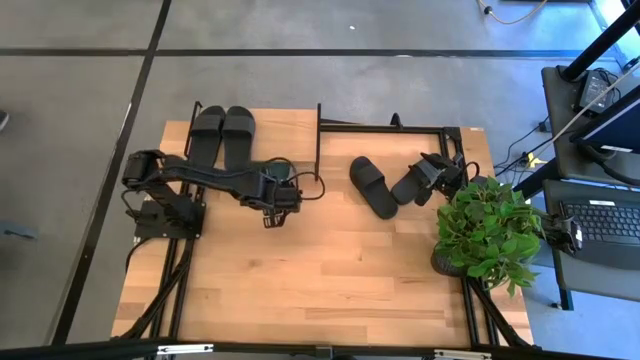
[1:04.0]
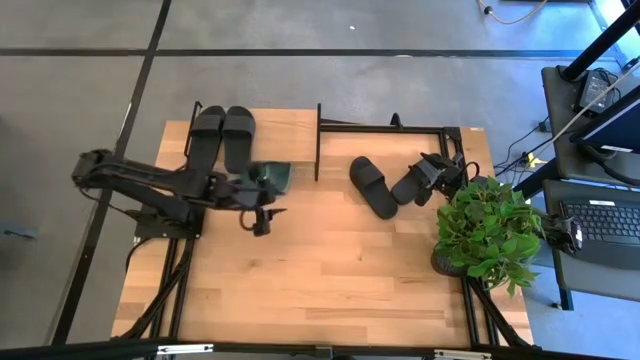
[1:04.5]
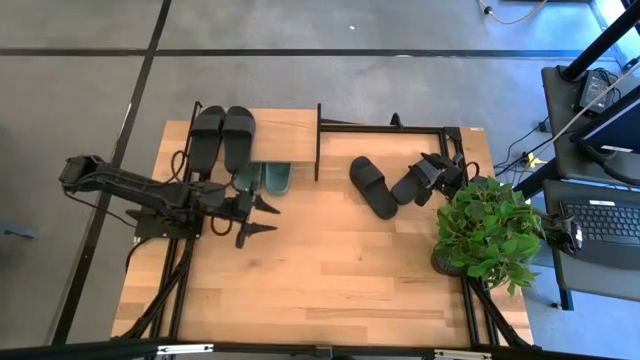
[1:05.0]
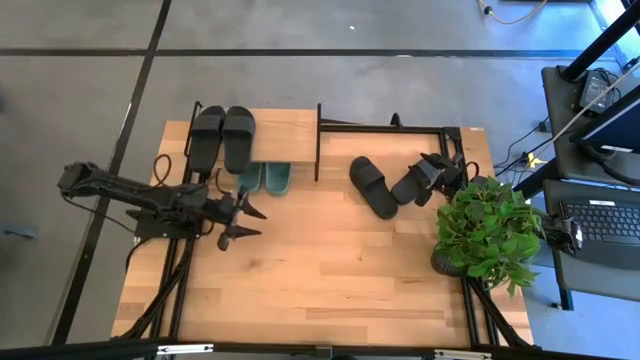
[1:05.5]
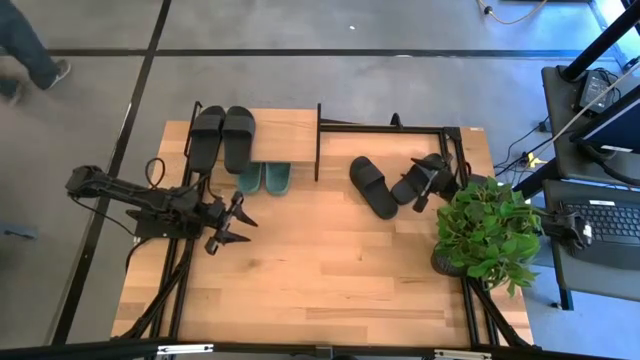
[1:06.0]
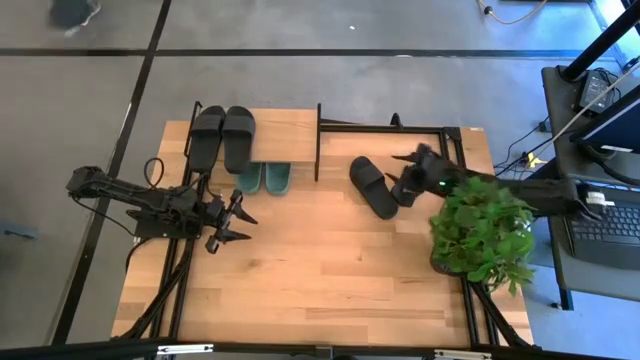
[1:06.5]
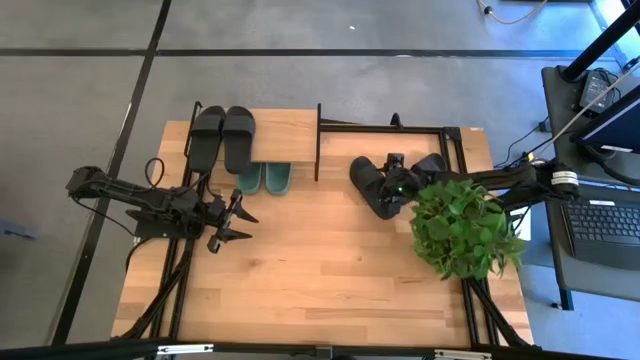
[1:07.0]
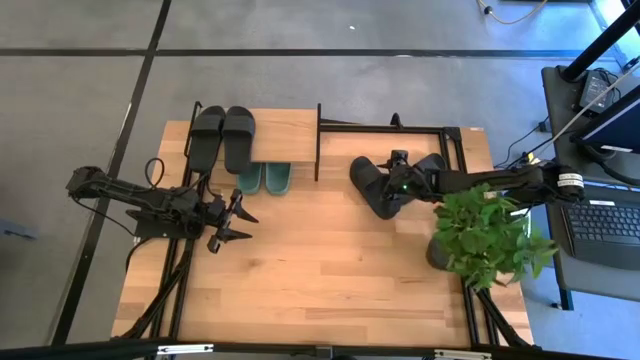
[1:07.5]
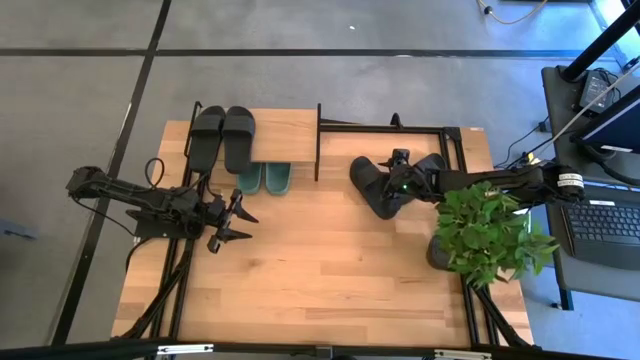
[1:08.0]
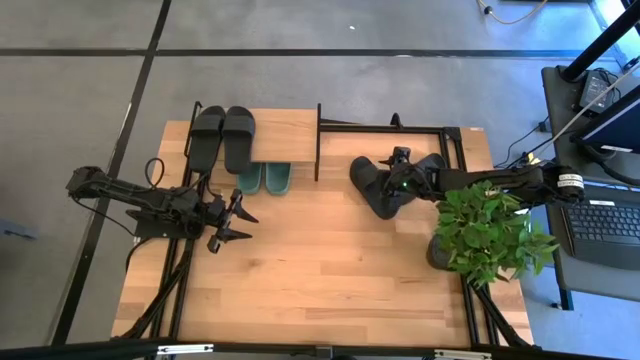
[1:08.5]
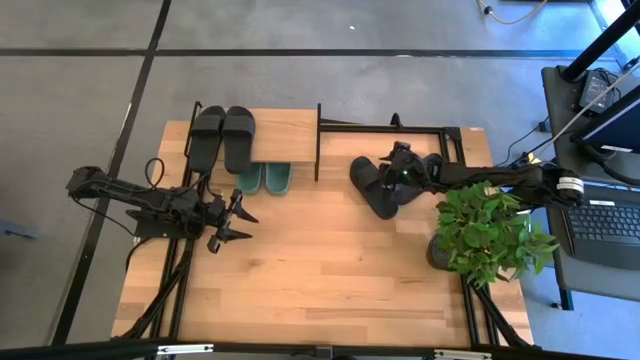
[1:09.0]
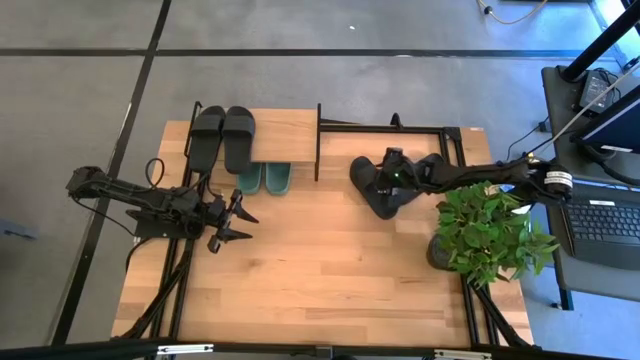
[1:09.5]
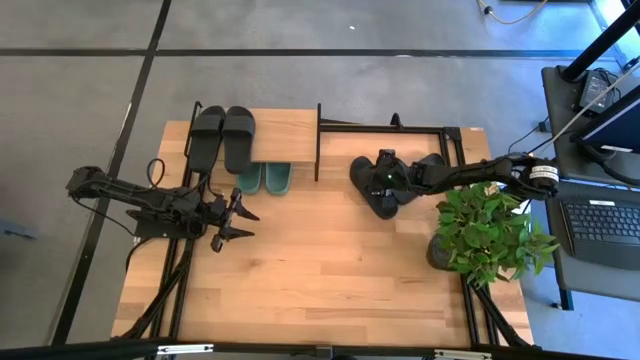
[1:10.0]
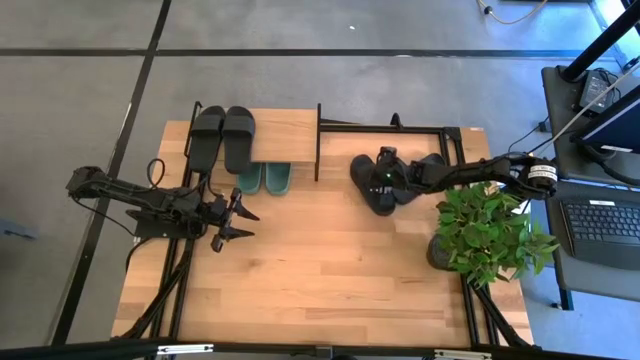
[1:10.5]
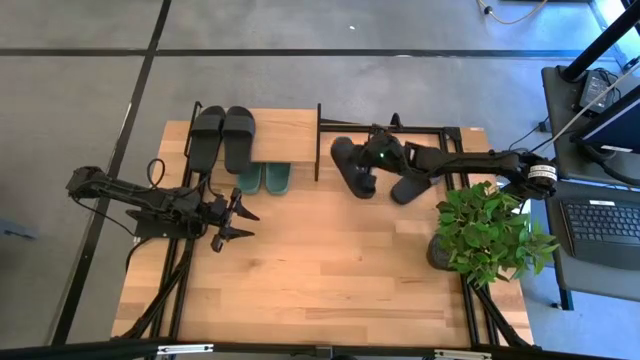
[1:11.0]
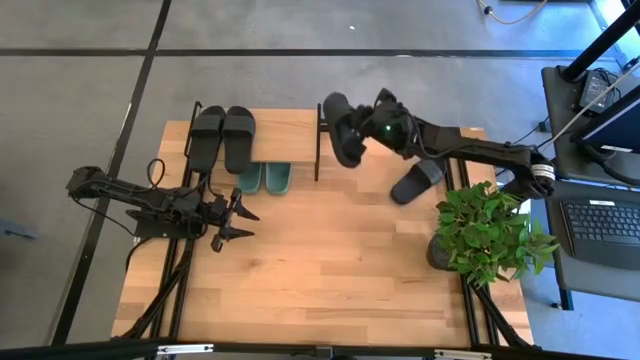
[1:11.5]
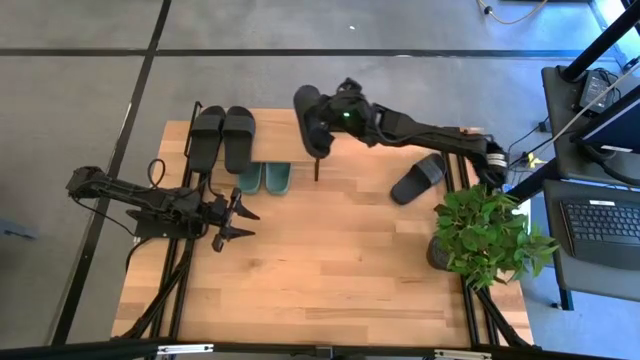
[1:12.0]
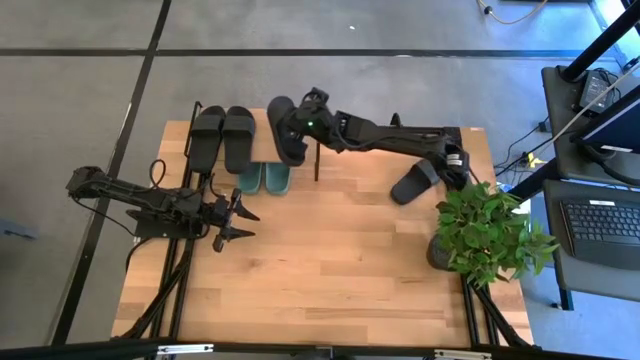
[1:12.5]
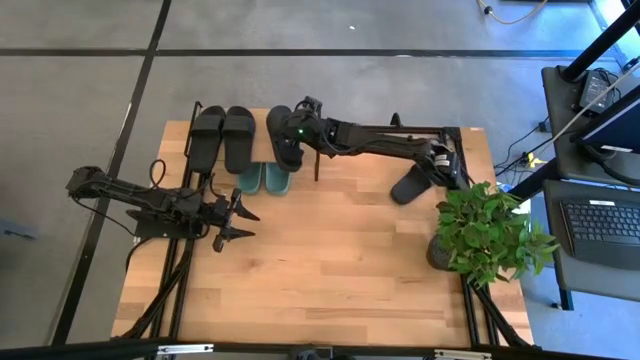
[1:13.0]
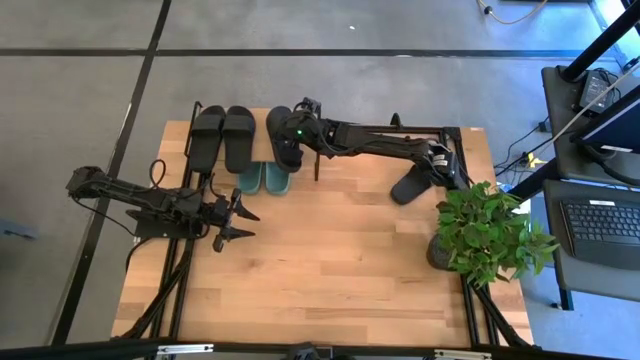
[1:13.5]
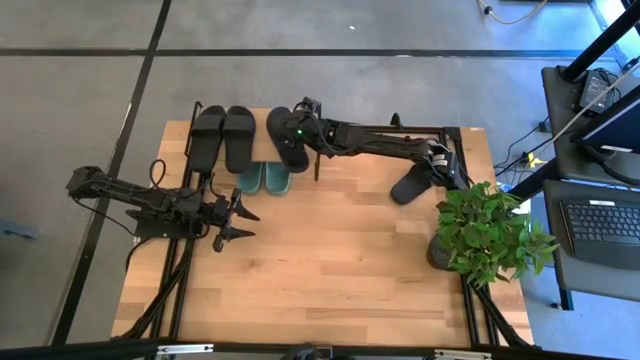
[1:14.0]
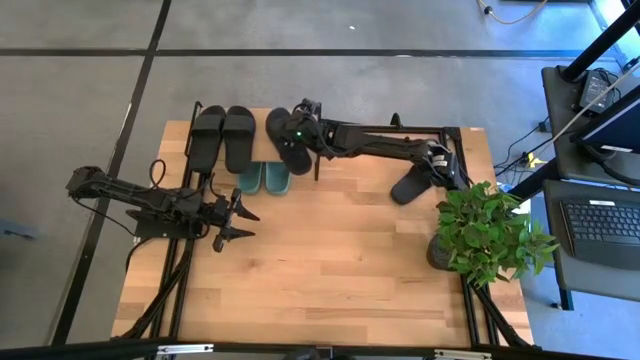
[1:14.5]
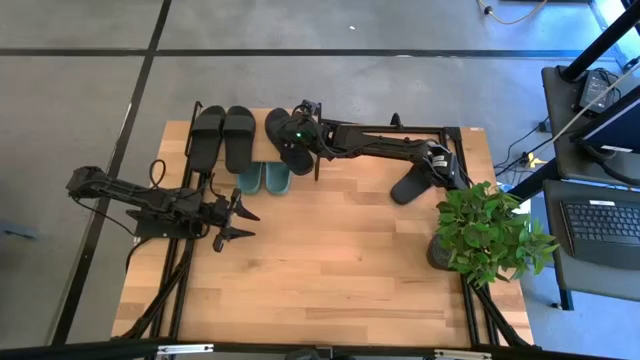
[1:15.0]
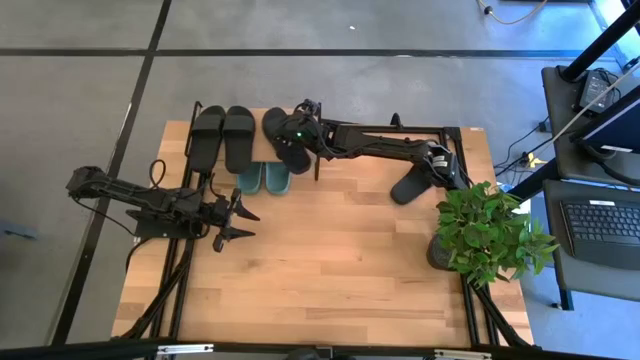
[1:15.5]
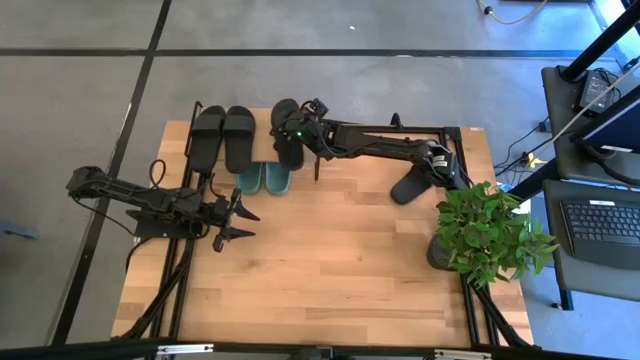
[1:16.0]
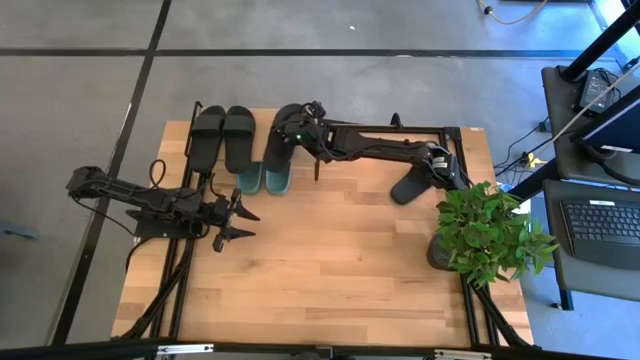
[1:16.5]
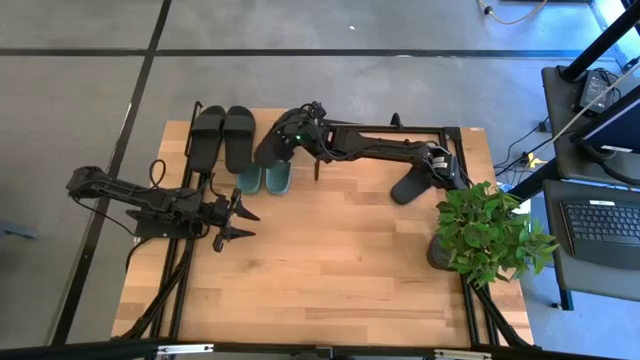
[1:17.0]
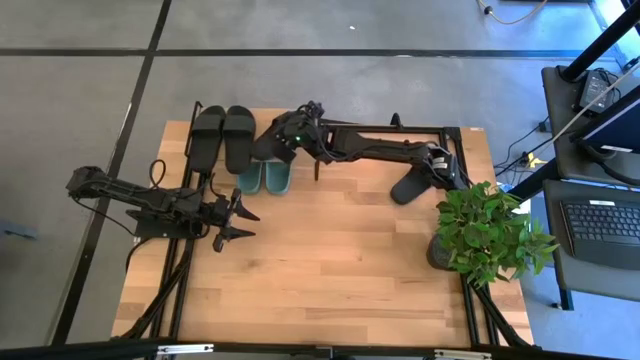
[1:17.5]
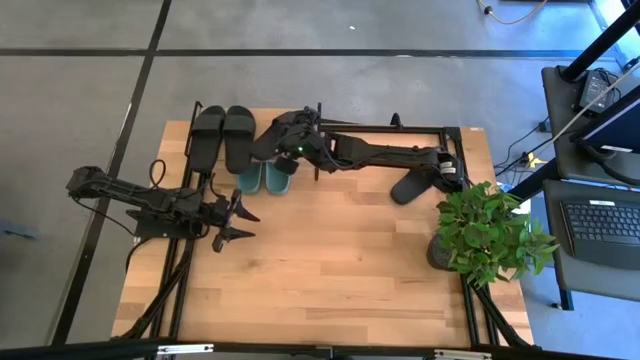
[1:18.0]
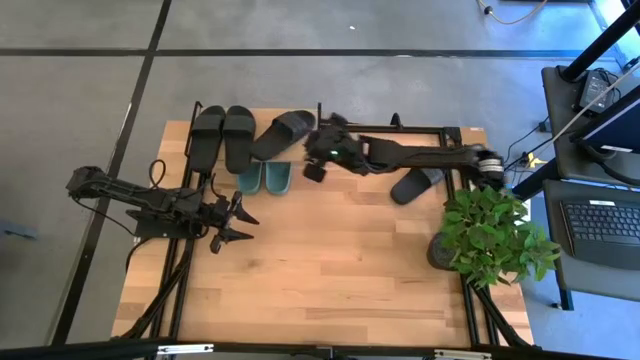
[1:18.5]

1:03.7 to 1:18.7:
Task: Pick and place slides into the shelf
Put the black slipper on the shelf

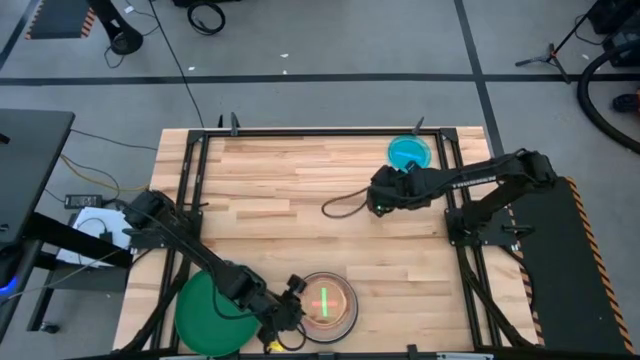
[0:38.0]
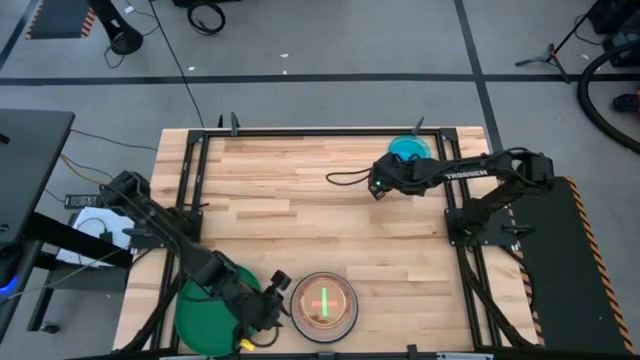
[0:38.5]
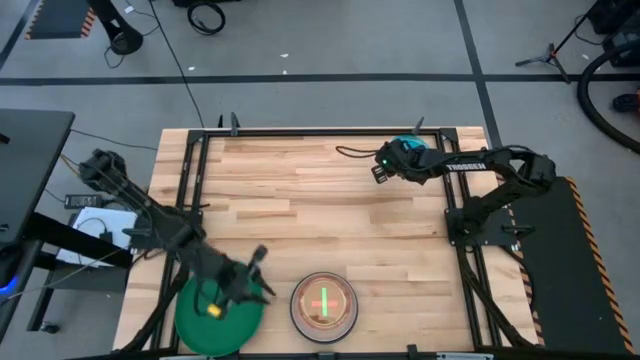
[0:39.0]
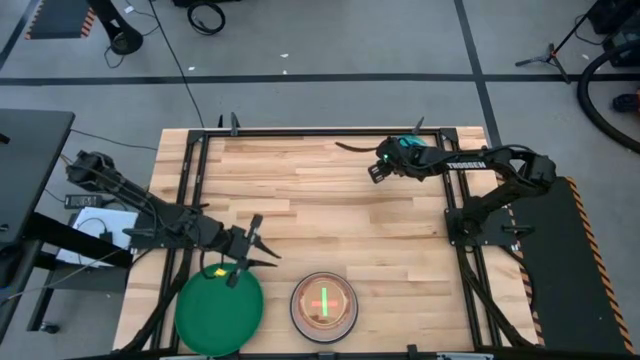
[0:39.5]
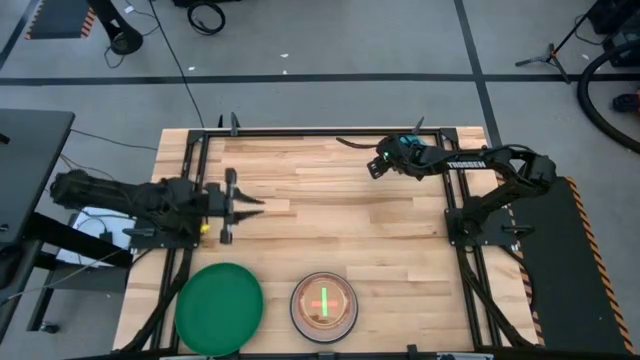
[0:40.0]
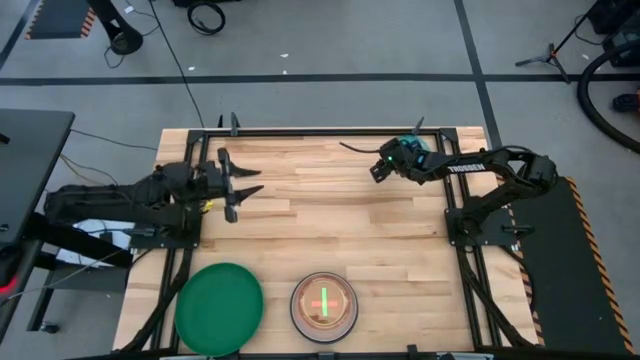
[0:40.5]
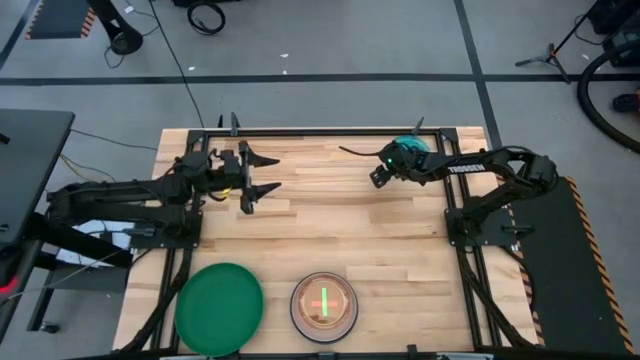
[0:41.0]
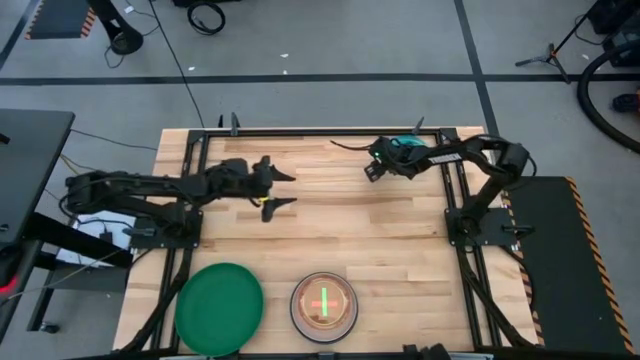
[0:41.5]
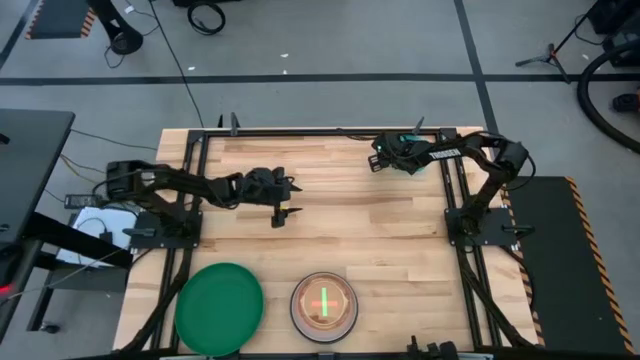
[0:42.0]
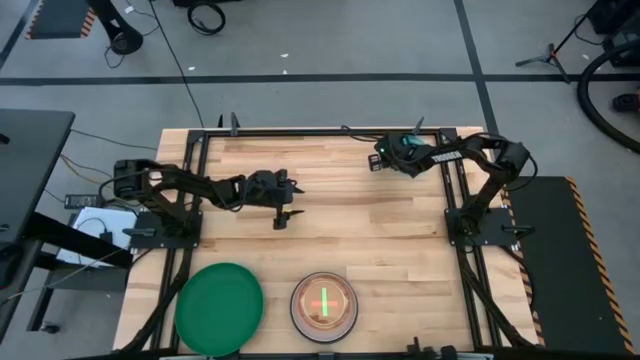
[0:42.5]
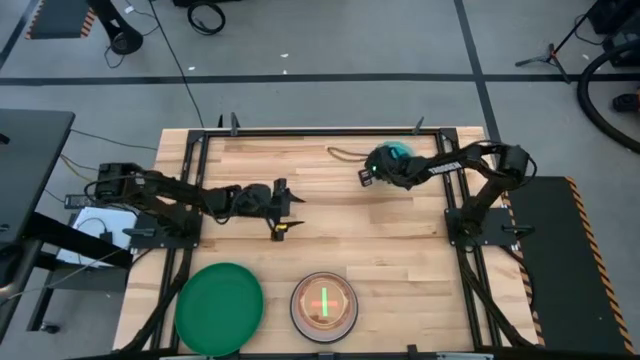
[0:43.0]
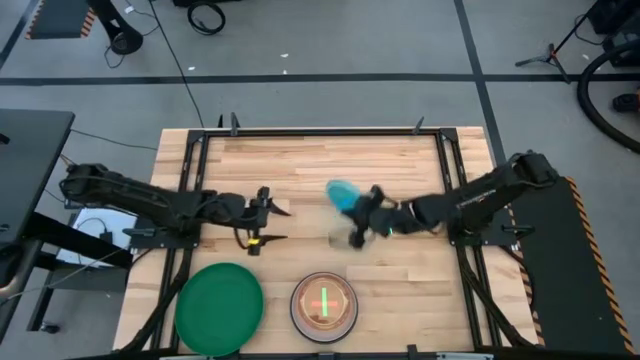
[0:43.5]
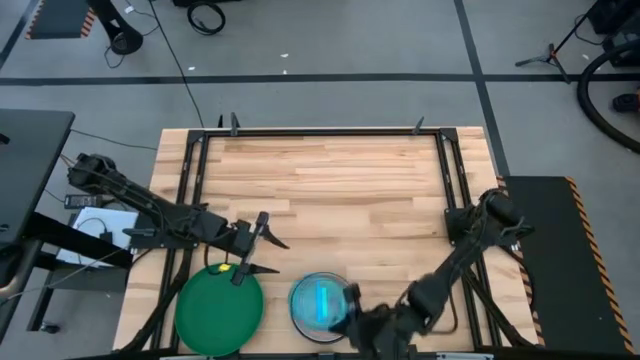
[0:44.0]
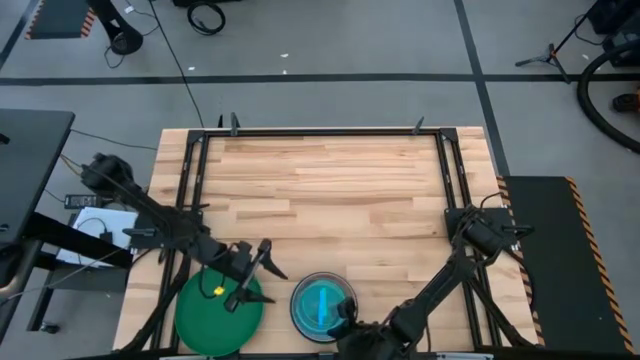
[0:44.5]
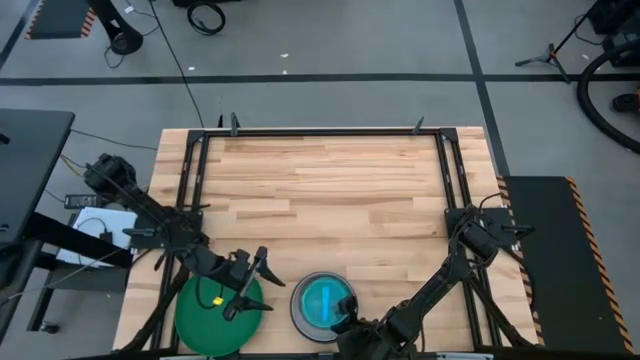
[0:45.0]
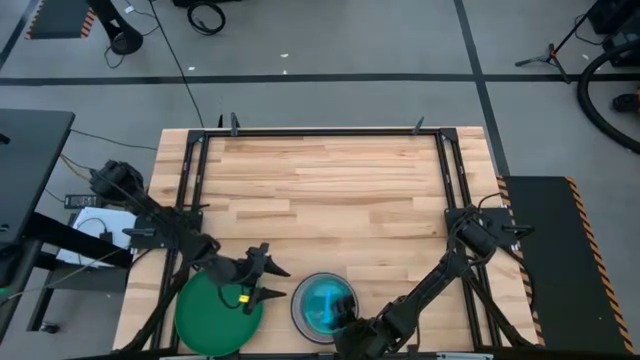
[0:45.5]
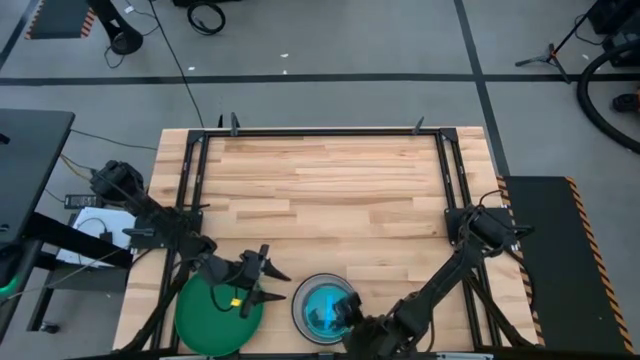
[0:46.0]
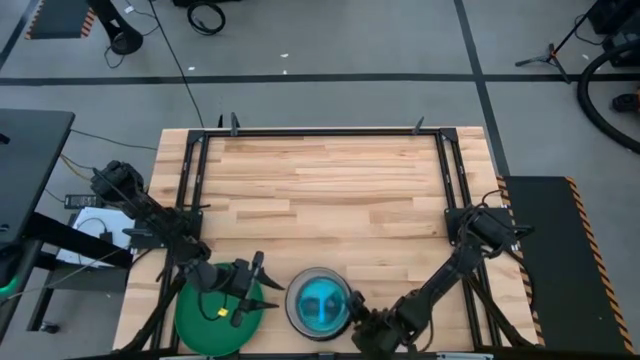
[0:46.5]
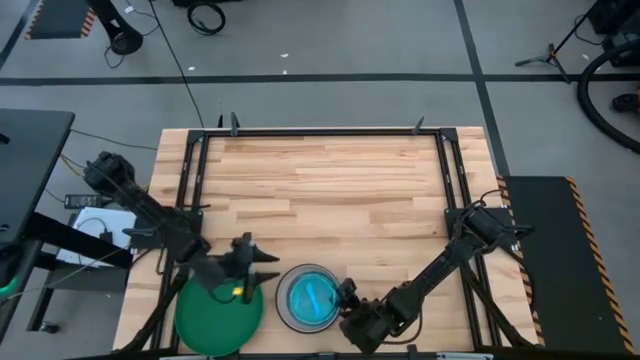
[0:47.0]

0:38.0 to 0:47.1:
Task: Stack plastic plates
Stack the blue plate on top of the light green plate
